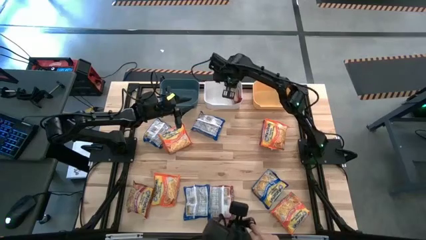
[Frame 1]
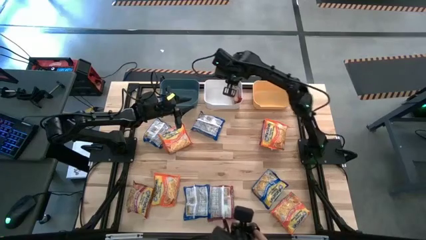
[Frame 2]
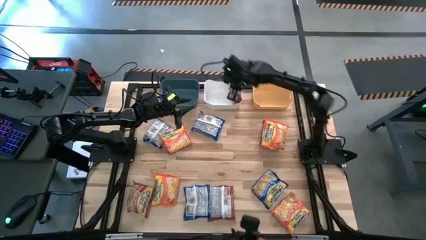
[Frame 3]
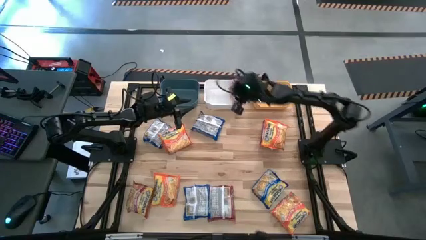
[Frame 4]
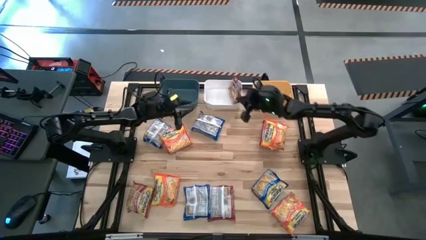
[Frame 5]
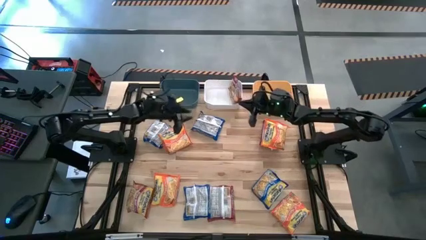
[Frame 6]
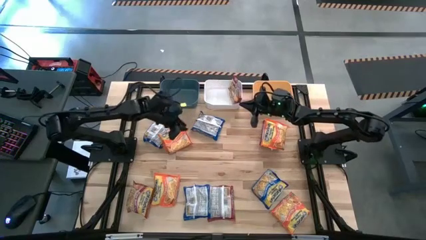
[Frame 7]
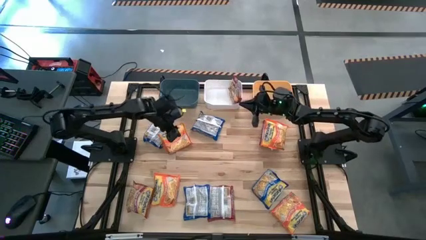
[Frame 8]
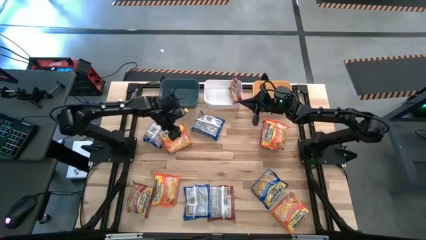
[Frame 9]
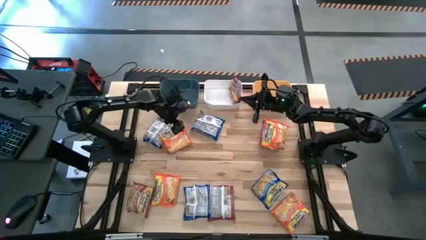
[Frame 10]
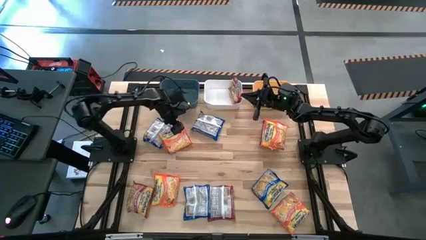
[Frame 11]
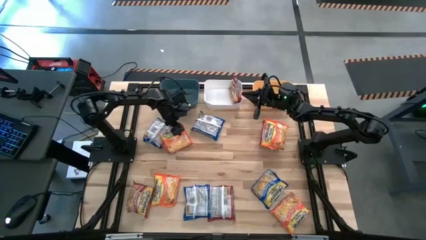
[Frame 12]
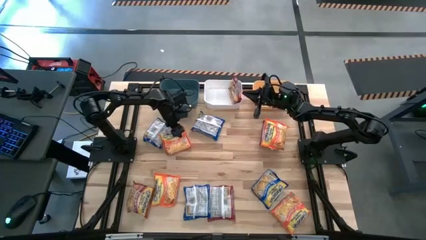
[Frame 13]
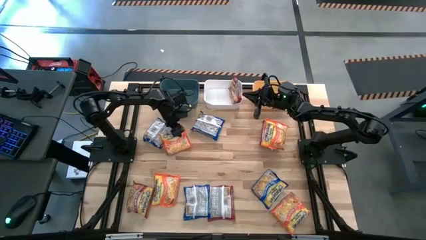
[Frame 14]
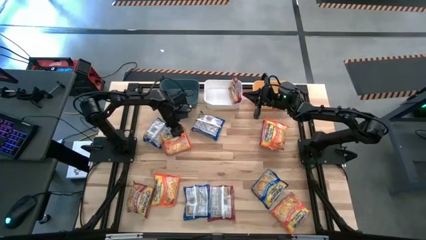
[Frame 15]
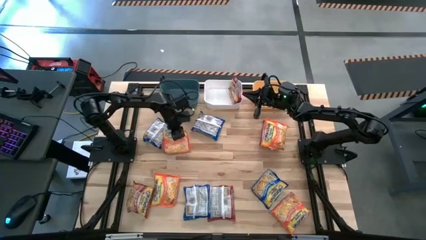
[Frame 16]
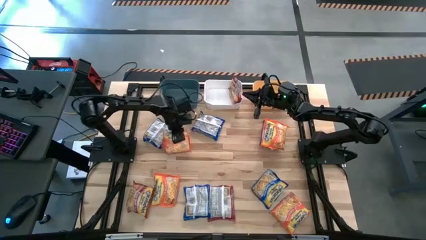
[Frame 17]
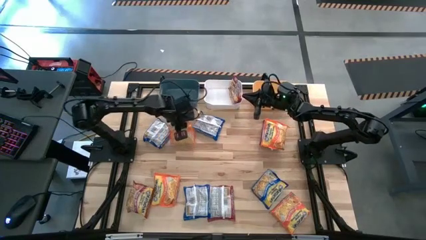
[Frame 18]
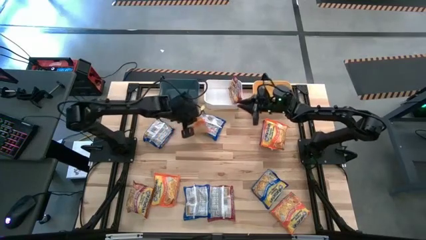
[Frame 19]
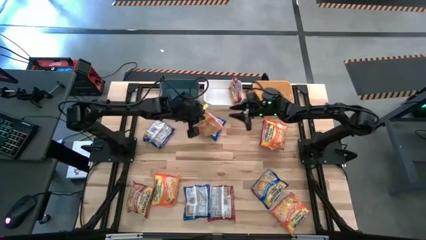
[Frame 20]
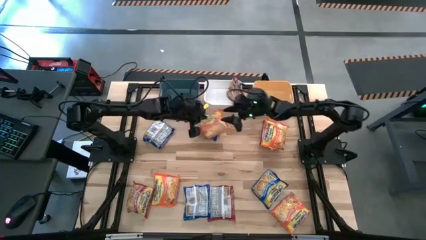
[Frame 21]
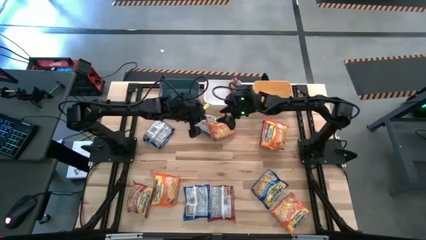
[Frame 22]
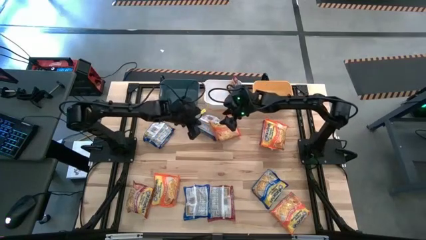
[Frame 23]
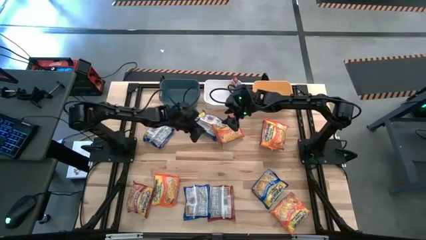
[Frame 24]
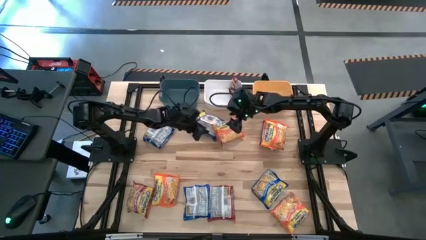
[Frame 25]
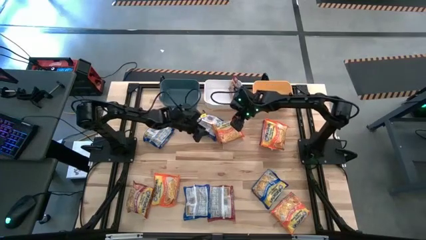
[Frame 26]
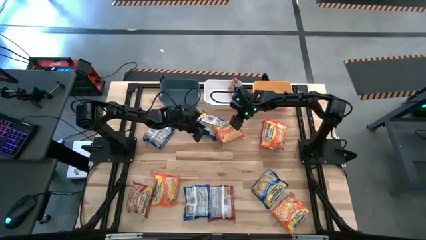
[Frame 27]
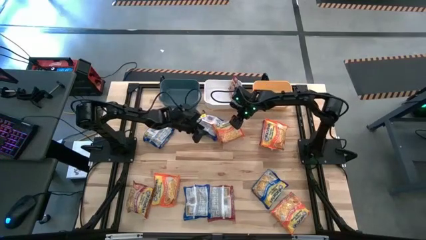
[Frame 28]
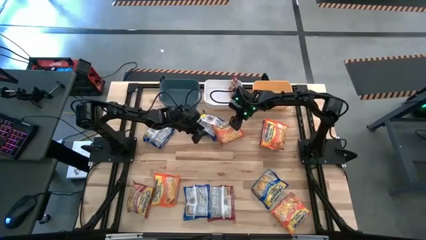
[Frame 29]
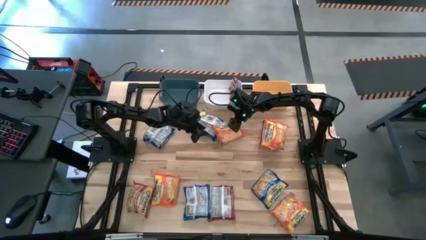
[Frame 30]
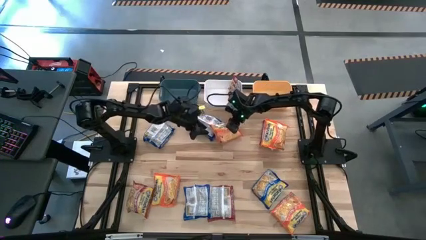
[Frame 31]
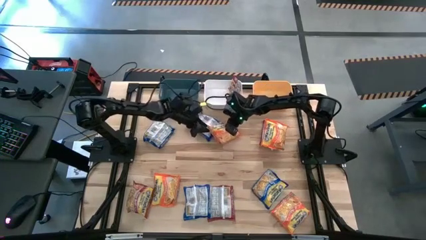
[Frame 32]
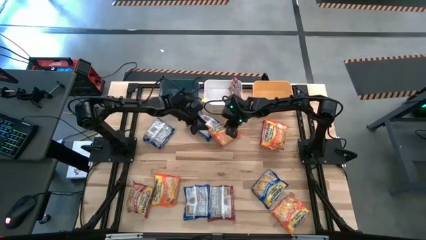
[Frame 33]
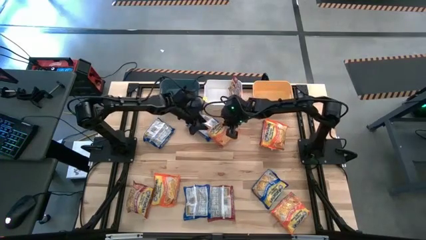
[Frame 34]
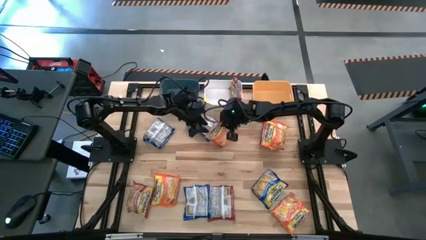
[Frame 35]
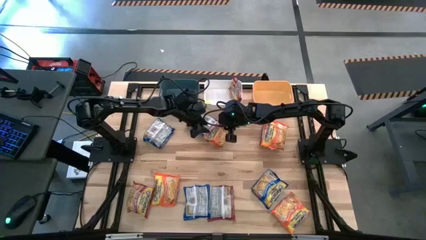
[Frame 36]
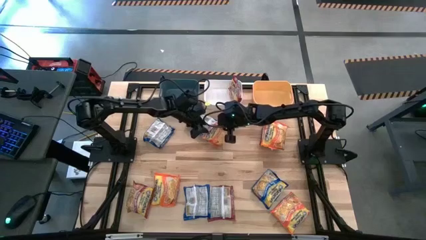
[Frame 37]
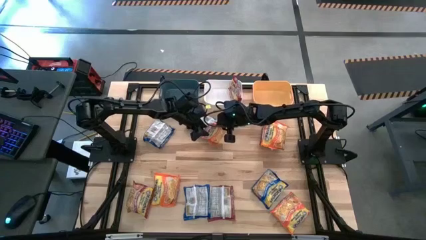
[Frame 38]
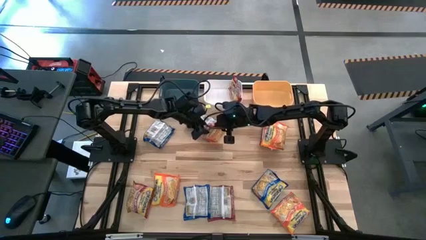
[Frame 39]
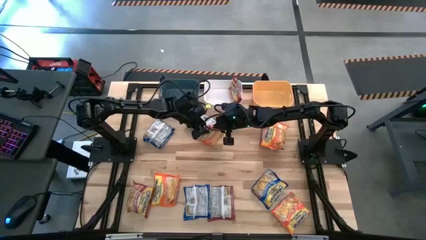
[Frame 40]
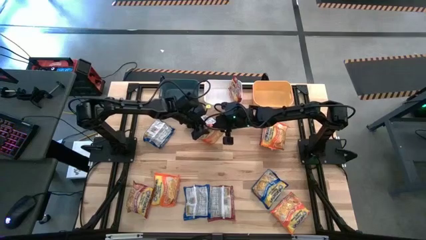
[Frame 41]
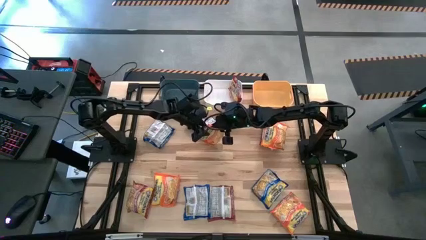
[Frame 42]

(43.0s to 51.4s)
Task: Sort Maruchan noodles
Put the top left orange noodle pack into the blue bin

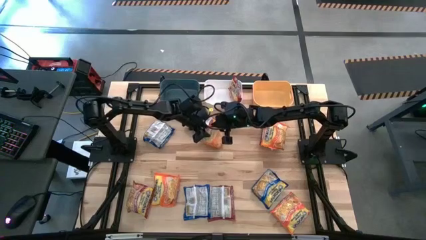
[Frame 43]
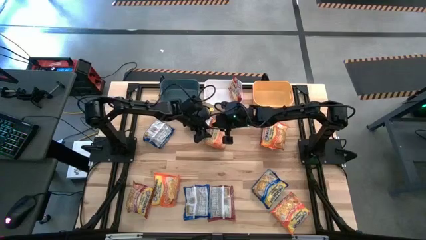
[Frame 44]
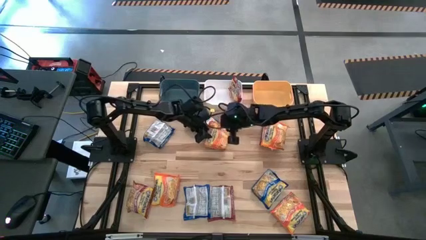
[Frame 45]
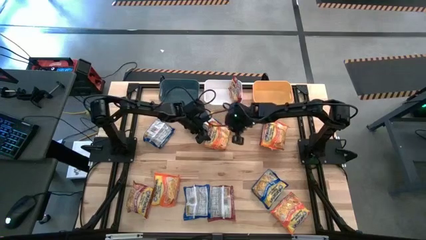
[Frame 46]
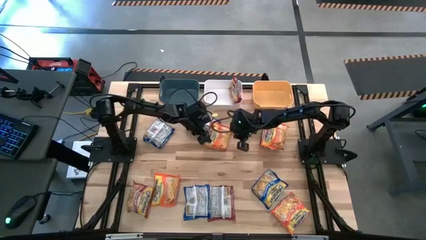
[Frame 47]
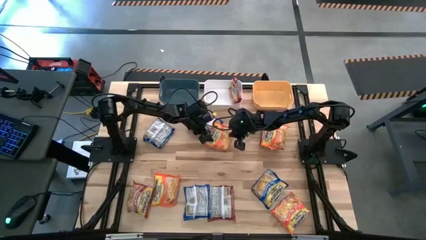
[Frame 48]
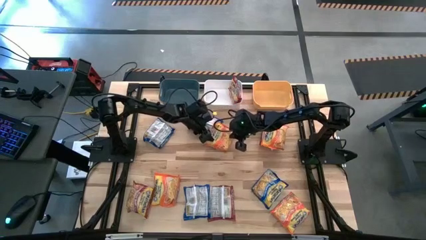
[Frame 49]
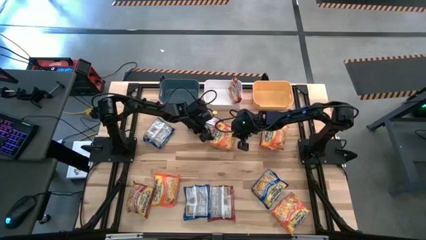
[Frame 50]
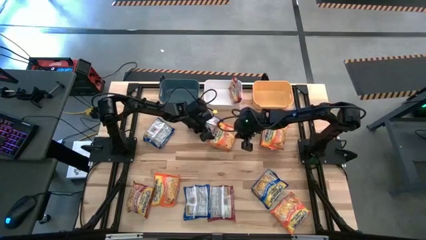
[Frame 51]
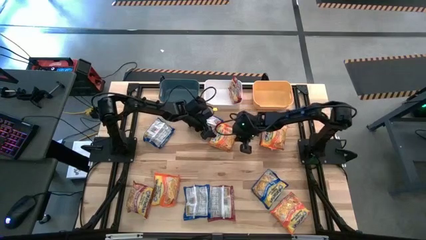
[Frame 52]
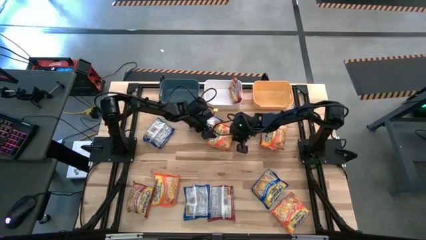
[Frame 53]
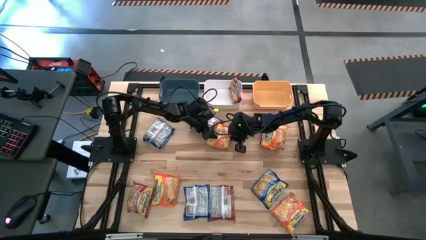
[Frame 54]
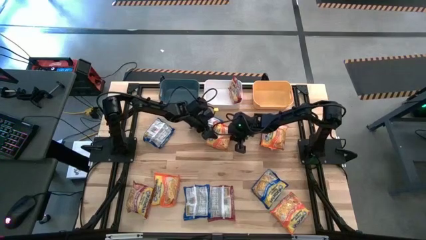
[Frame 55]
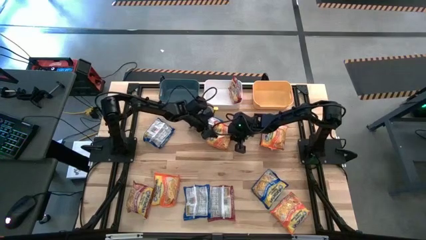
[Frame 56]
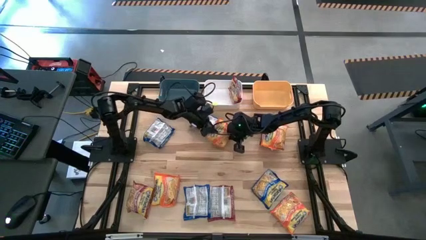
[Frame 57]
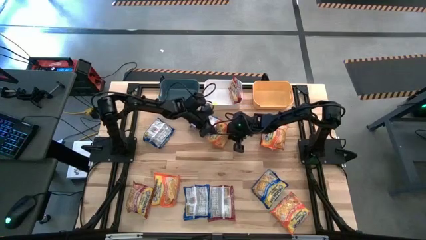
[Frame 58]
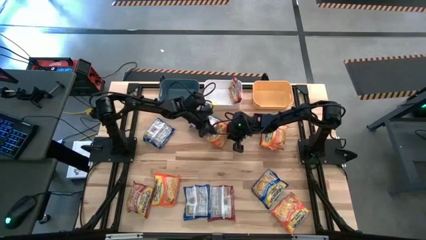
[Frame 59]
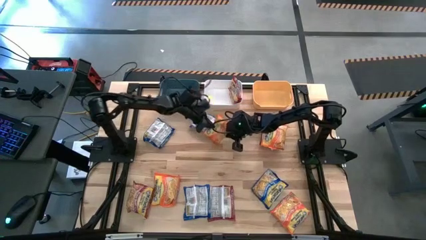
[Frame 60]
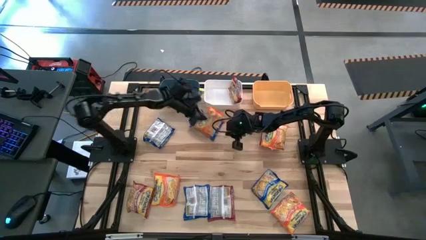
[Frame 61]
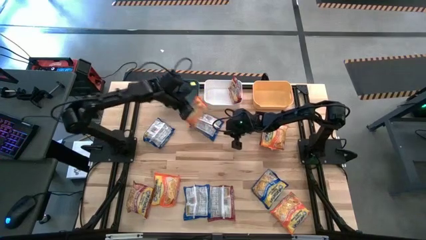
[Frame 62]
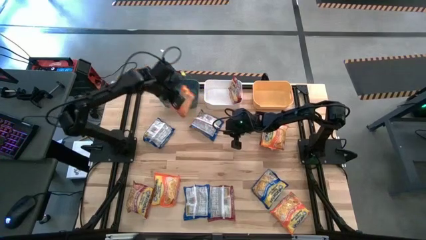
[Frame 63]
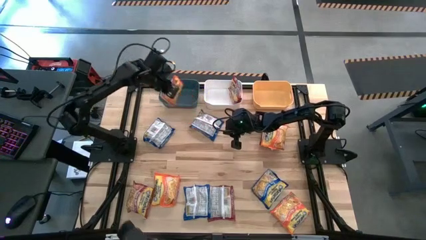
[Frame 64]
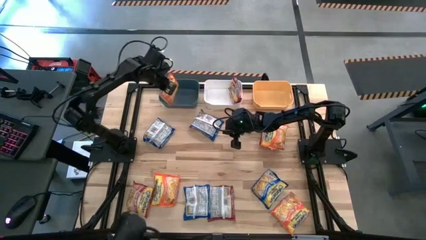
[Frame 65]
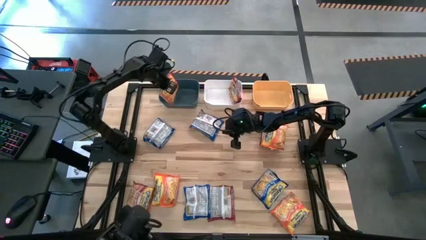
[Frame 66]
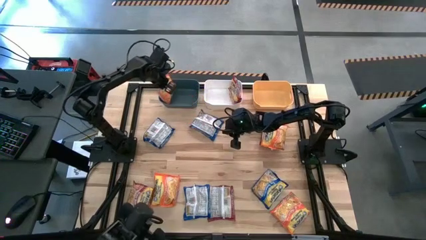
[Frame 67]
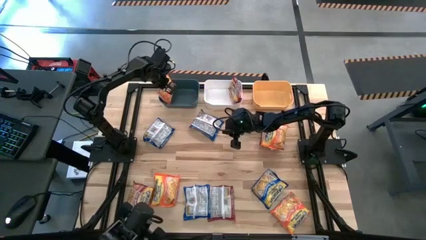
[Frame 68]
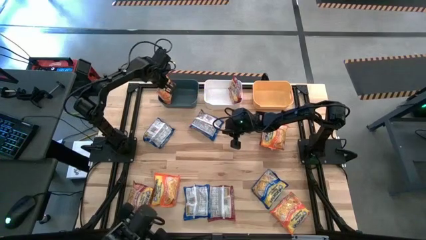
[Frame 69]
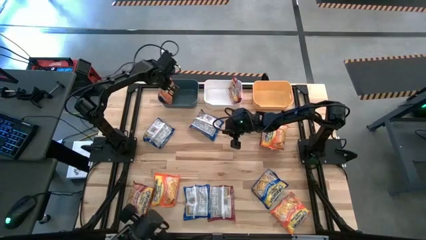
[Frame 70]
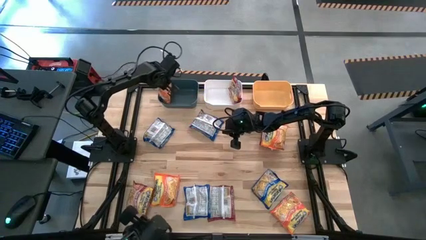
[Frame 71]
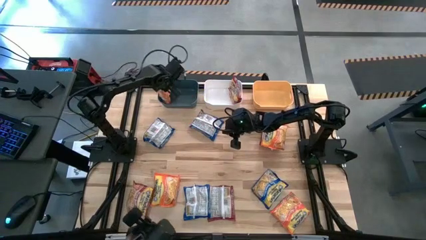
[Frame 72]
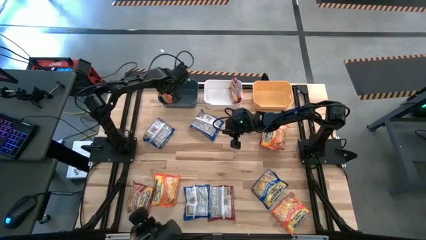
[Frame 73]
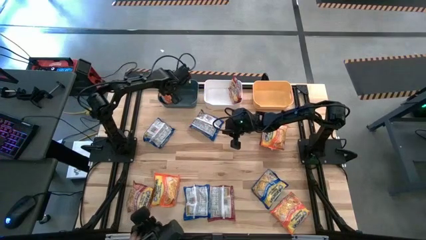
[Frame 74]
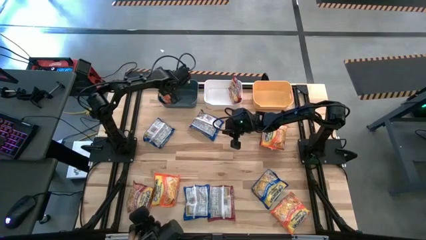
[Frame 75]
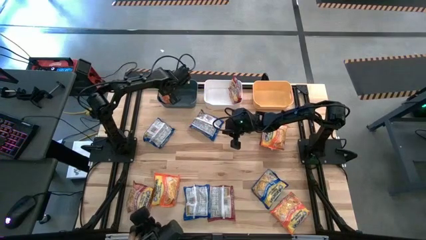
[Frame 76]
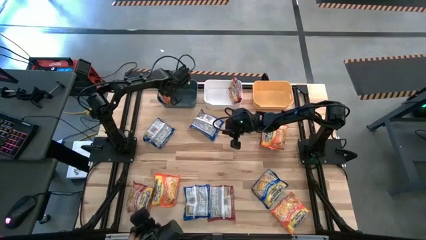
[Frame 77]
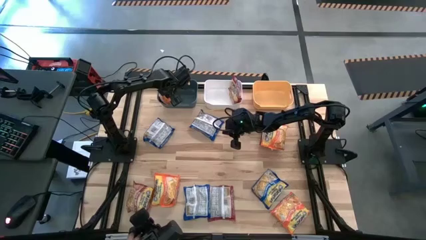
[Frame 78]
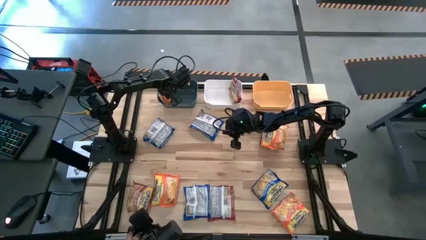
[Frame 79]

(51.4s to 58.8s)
Put the top left orange noodle pack into the blue bin
